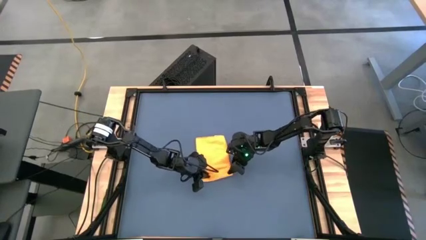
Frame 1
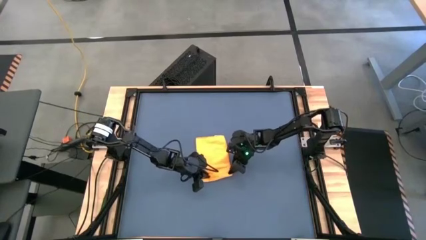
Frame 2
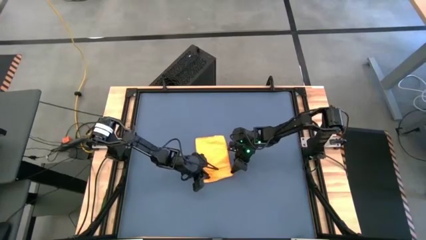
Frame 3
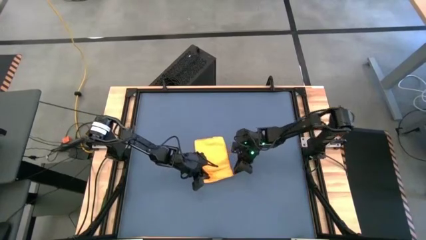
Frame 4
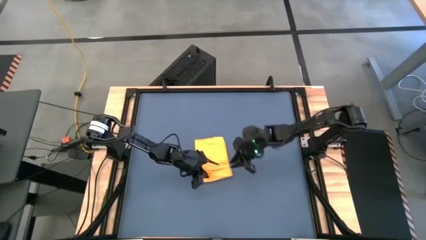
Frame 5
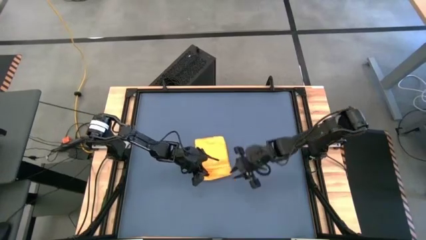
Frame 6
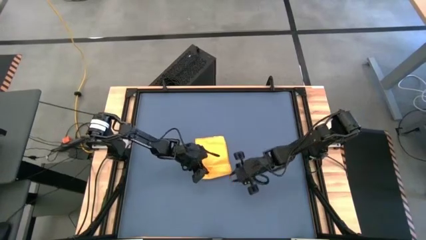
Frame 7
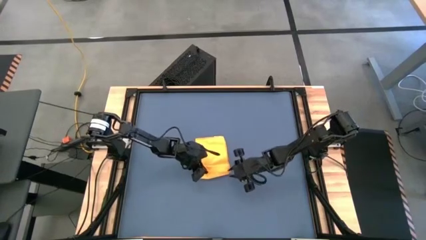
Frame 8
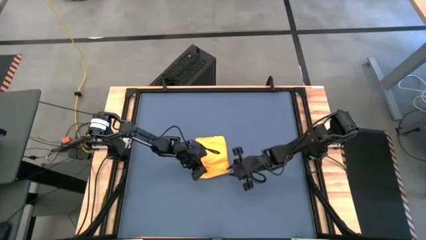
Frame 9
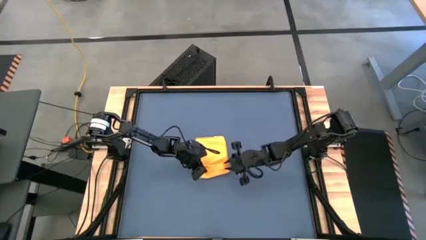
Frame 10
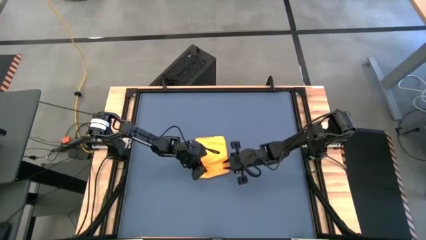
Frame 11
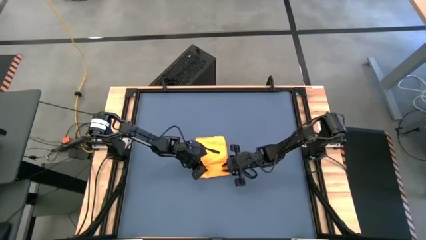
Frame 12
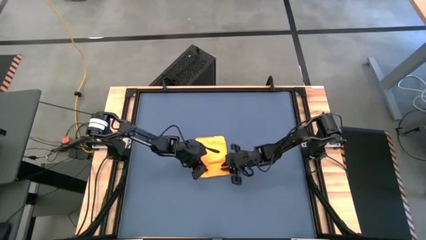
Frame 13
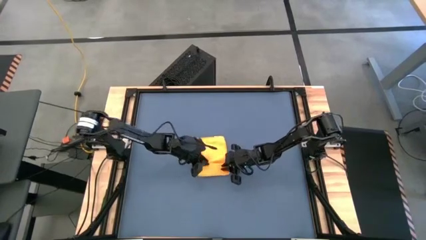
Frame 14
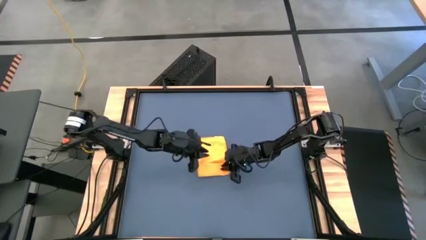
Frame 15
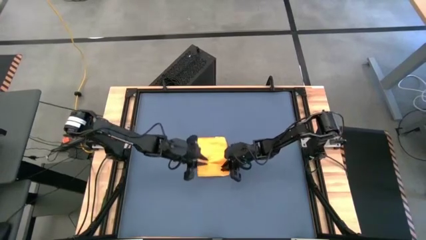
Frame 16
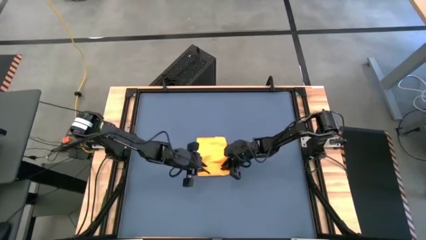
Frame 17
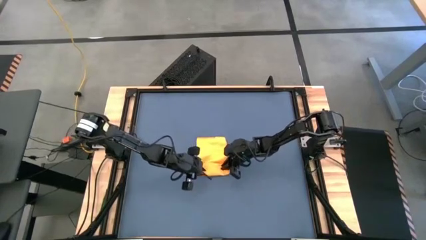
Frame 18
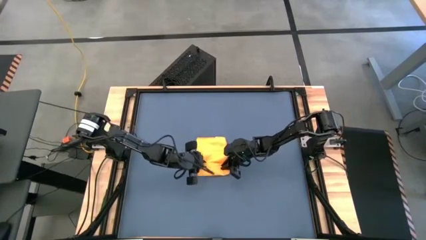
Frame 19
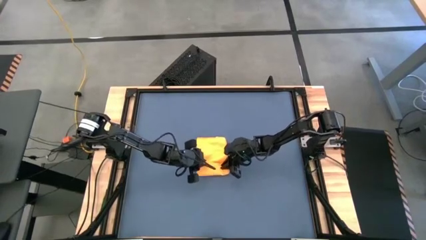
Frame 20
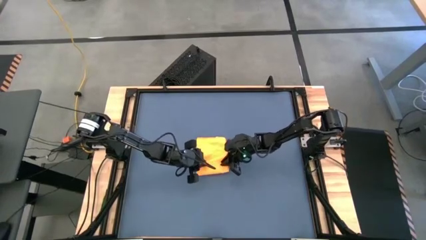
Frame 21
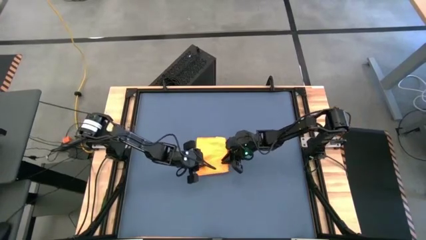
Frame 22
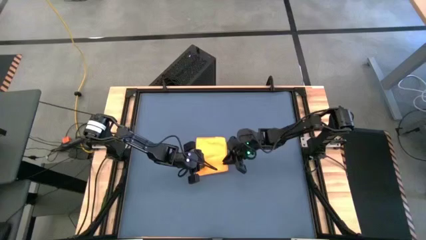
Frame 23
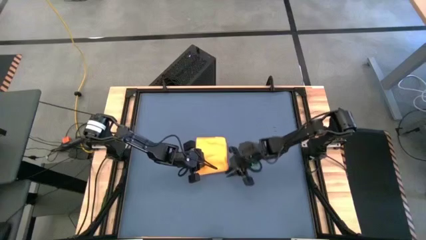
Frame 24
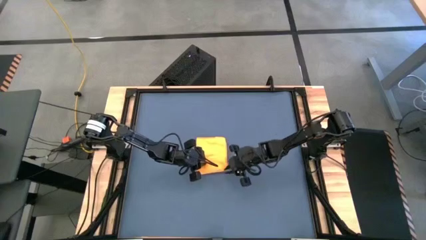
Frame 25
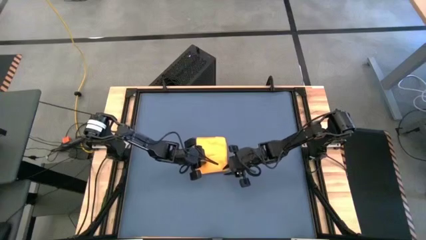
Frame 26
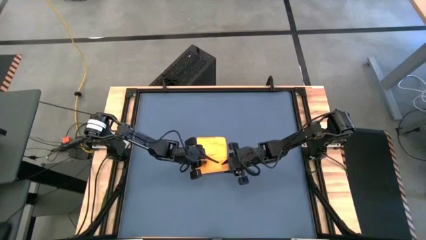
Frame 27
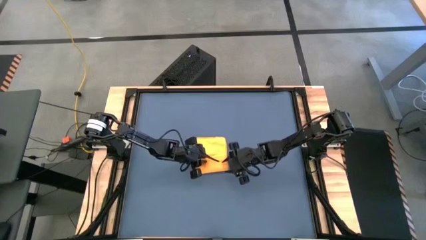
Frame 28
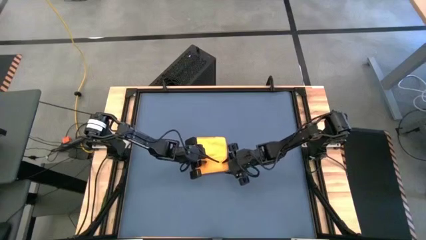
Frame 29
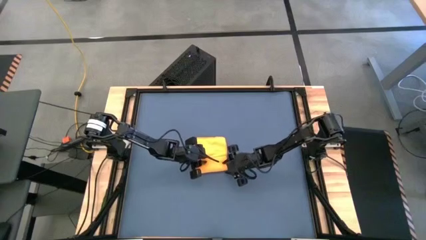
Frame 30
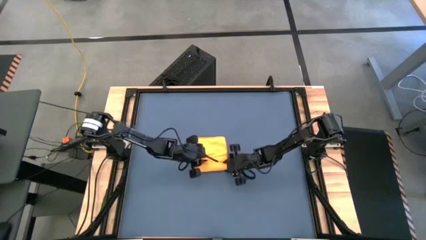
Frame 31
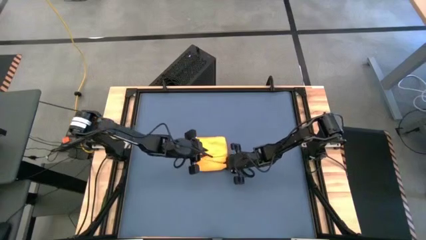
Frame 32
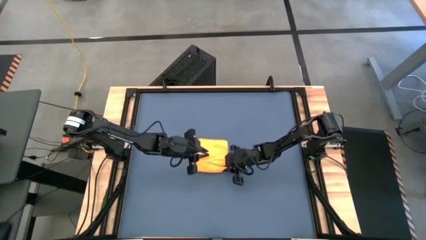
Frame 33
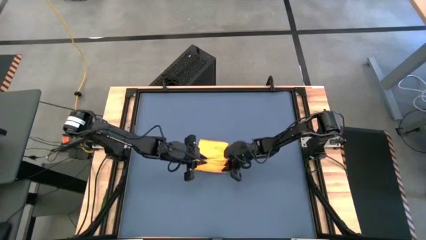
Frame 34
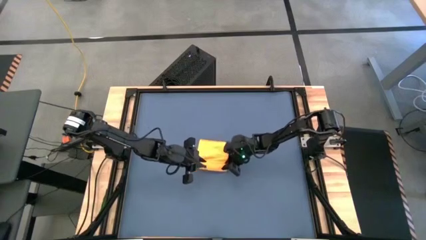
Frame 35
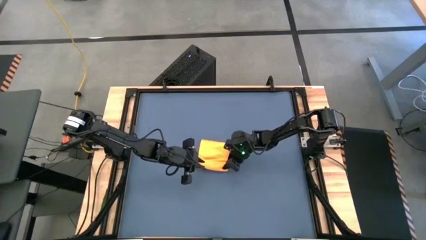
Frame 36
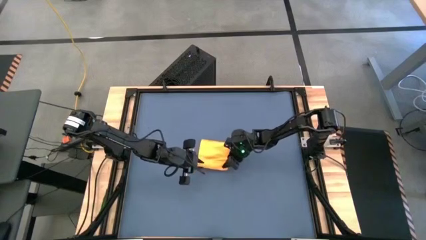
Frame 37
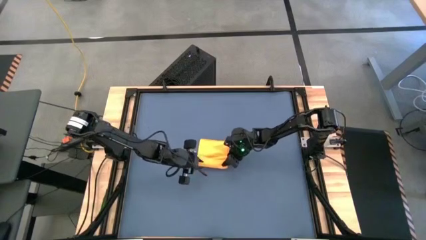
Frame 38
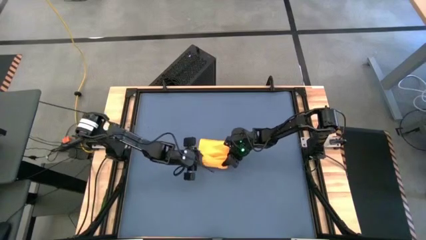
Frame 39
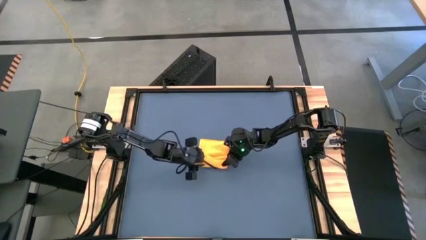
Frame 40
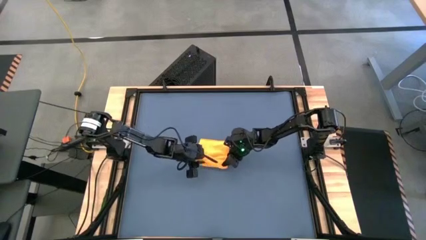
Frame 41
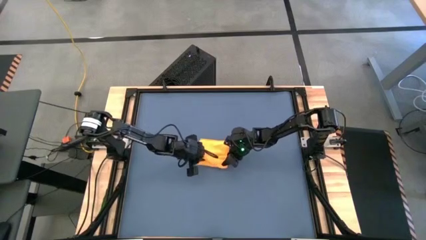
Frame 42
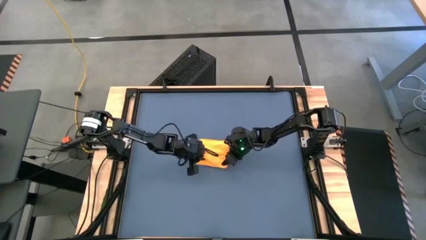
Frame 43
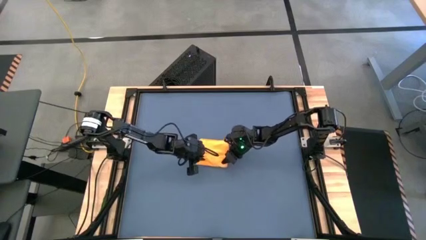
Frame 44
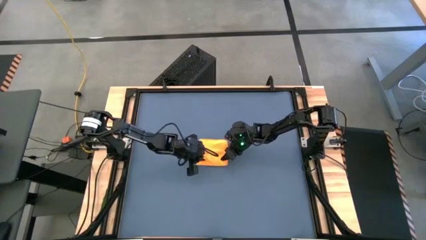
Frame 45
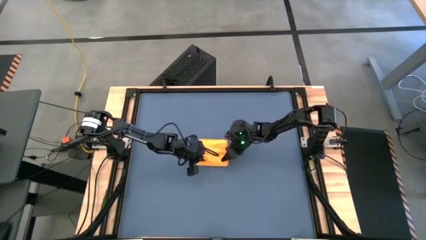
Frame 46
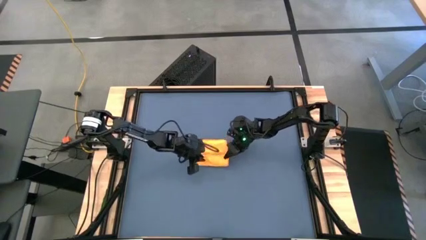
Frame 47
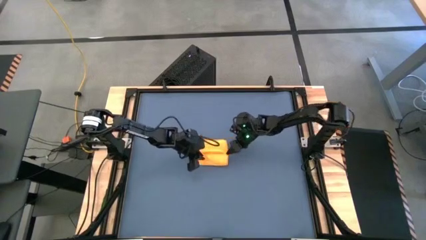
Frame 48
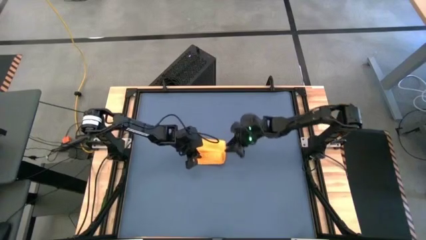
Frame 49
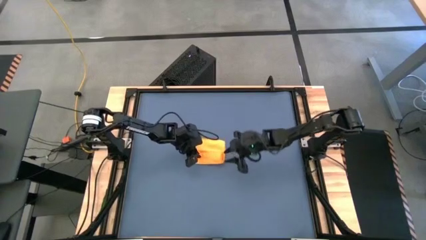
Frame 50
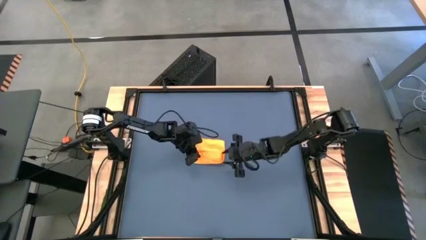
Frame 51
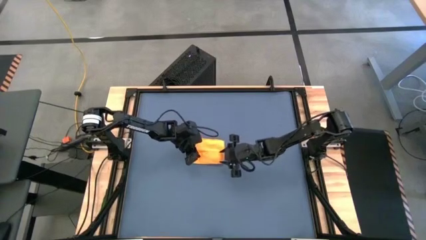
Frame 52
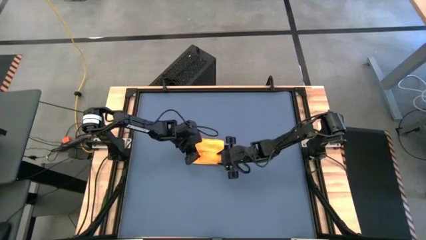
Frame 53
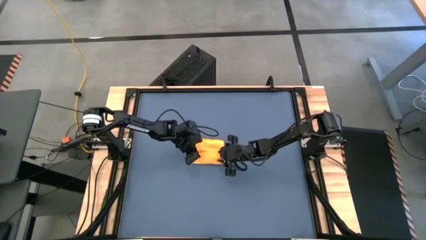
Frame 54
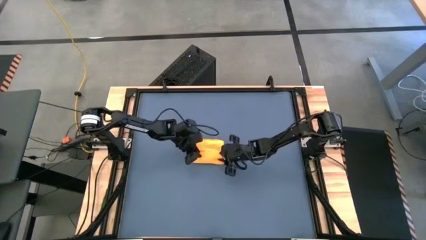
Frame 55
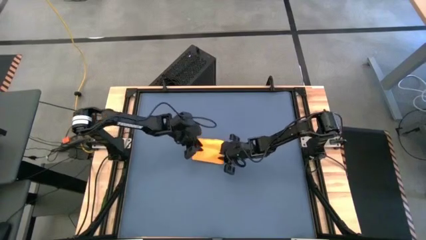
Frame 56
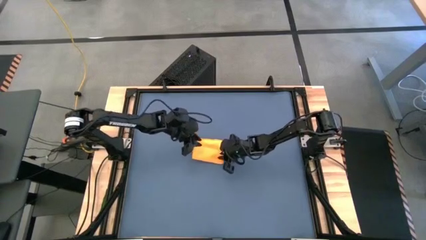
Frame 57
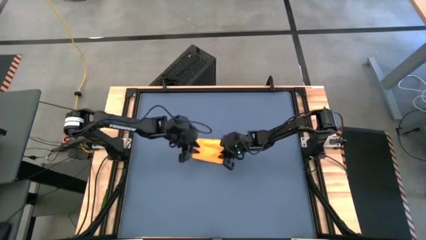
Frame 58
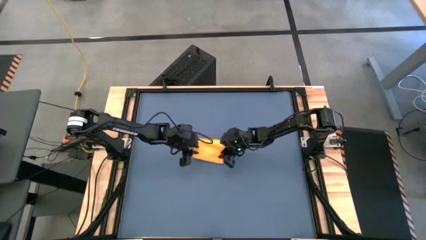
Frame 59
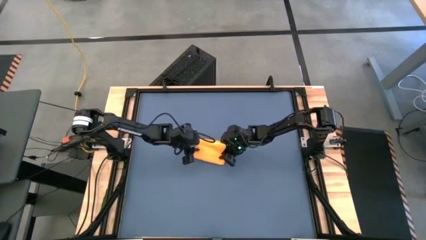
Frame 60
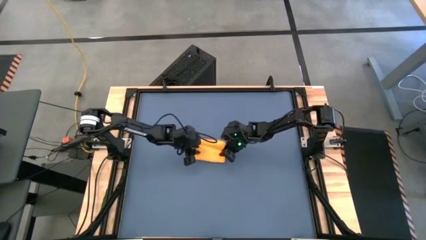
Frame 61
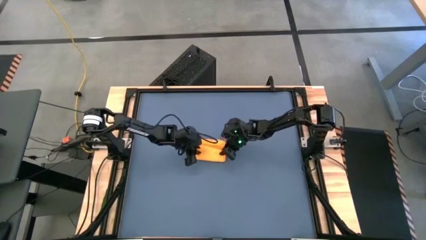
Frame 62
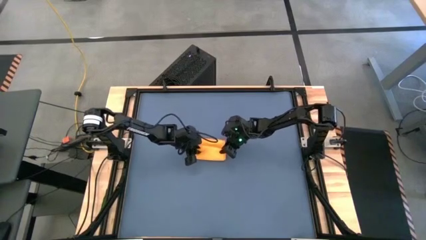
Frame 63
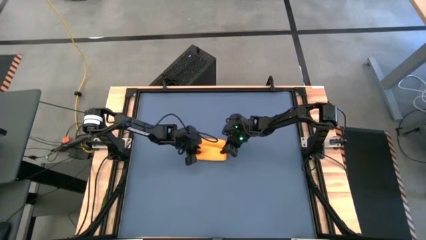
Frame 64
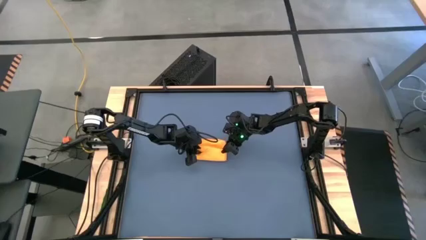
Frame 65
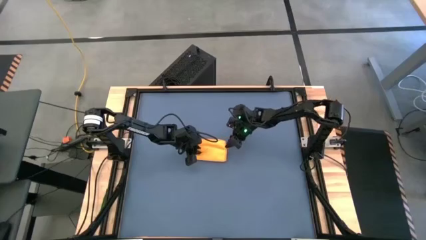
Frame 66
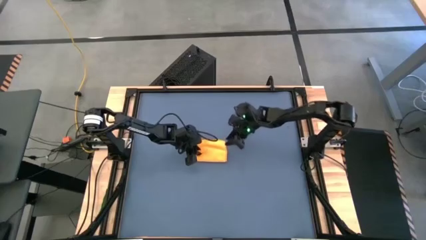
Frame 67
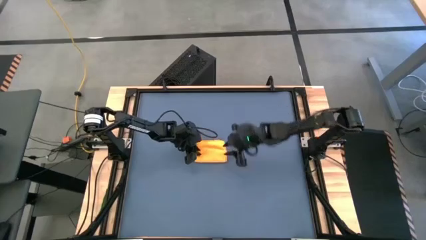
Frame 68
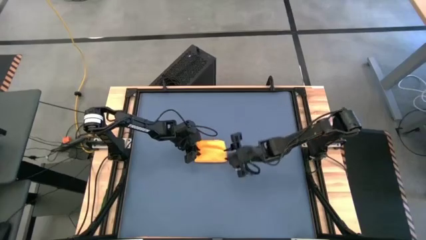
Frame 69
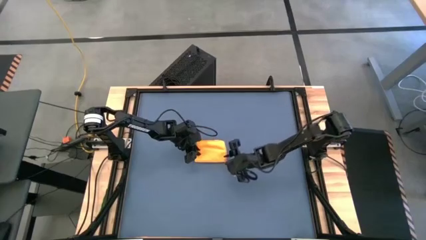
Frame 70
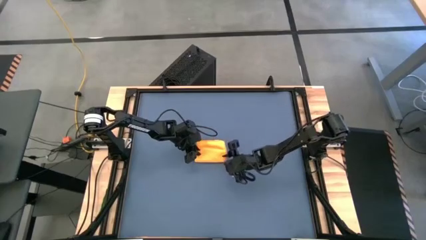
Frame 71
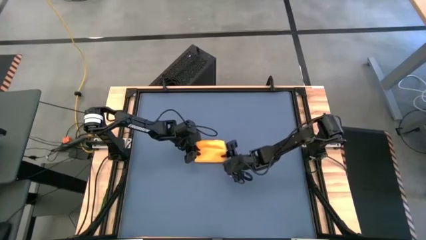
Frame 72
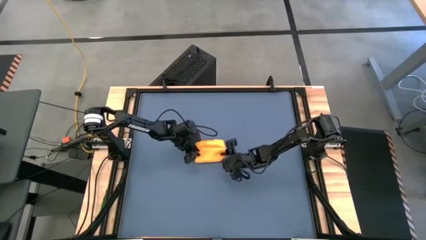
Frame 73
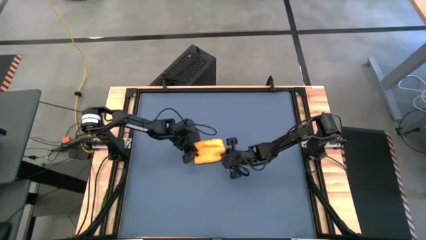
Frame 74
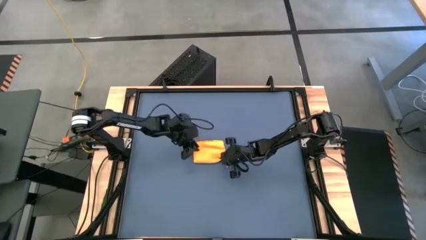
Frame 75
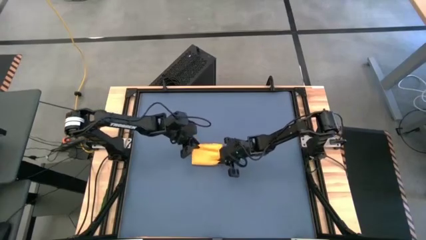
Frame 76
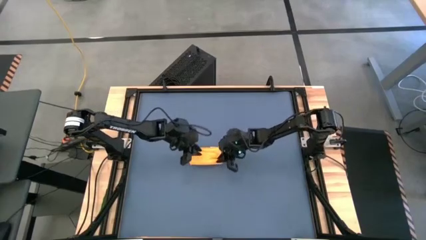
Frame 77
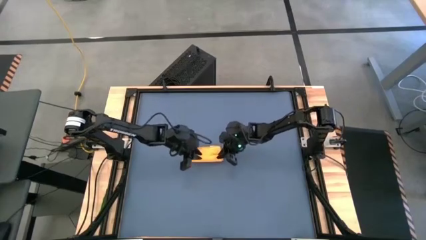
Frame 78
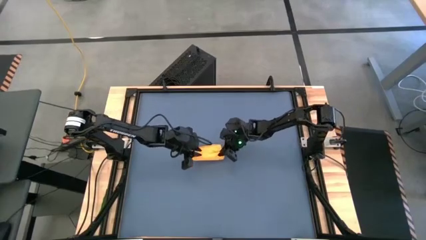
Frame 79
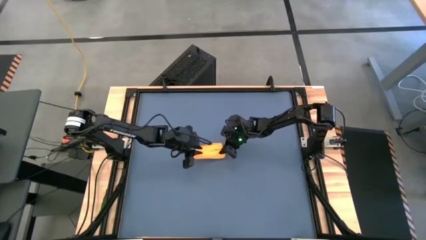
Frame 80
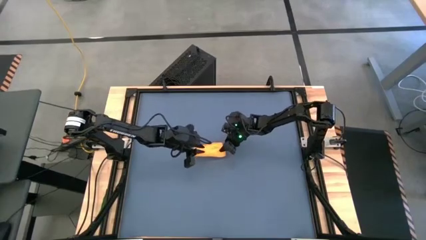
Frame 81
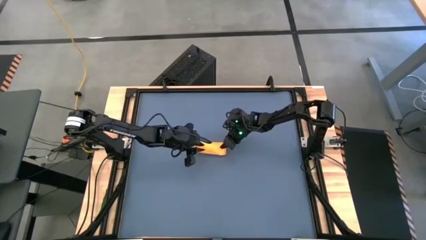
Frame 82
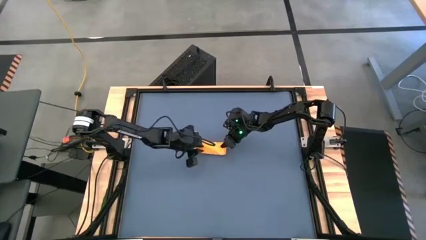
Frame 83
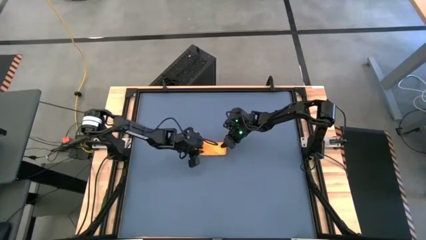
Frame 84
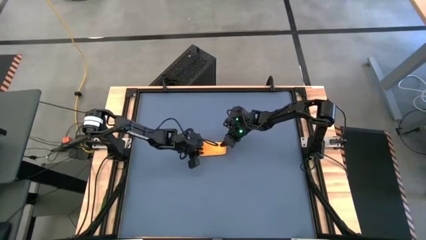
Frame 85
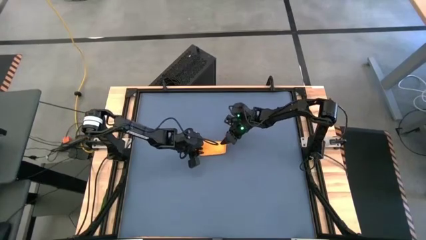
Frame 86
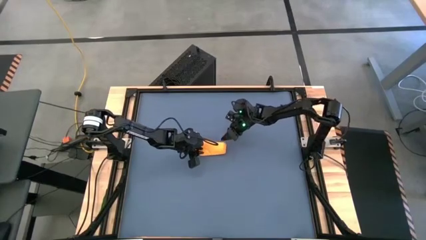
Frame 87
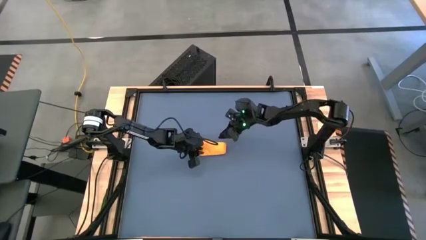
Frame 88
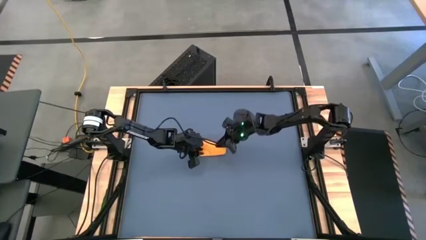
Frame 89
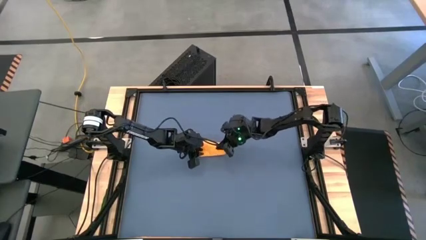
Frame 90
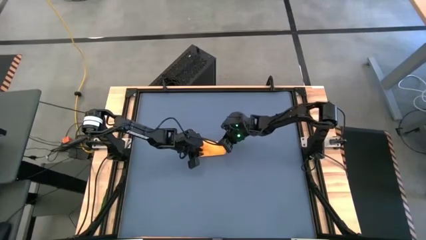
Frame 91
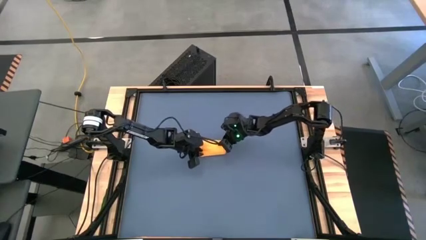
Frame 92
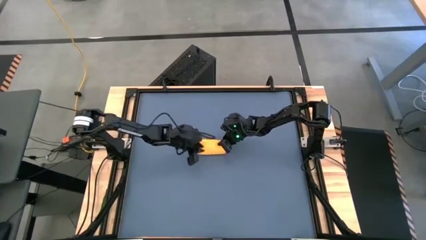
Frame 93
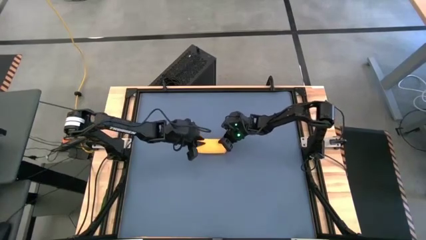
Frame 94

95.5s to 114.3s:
Task: Roll towel
Roll the yellow microfiber towel
